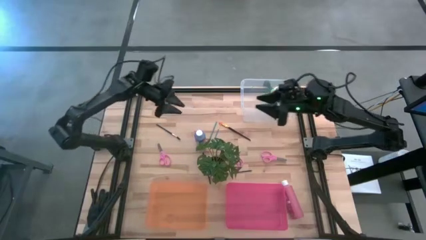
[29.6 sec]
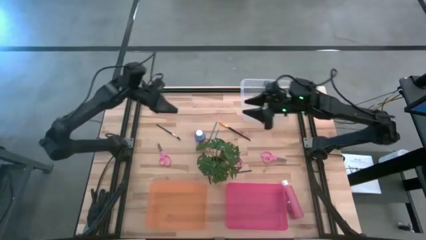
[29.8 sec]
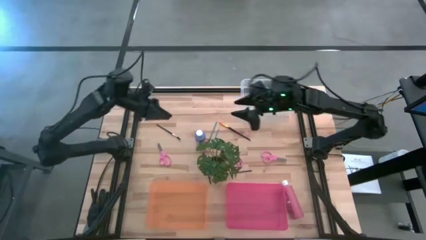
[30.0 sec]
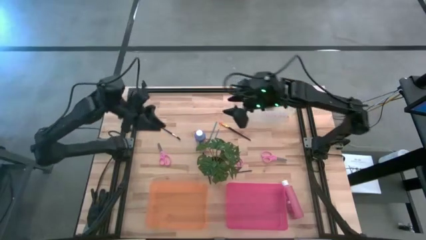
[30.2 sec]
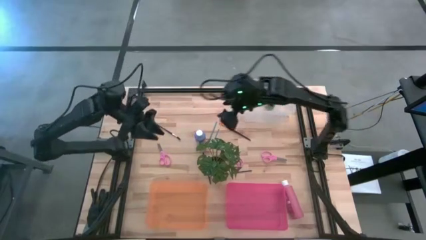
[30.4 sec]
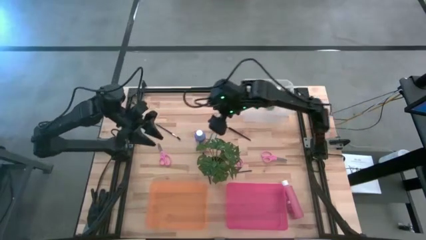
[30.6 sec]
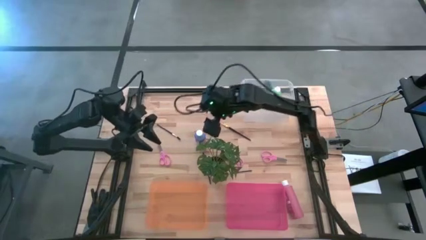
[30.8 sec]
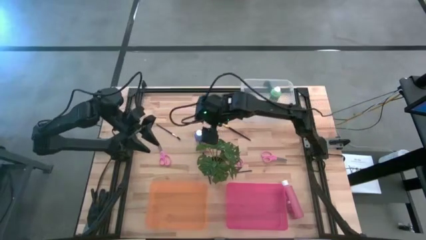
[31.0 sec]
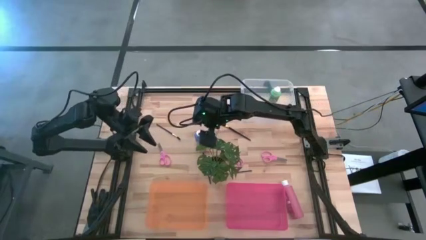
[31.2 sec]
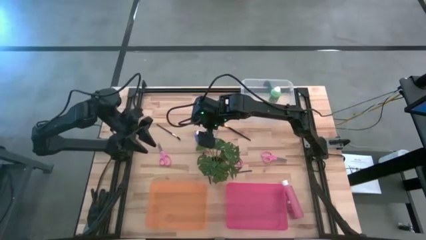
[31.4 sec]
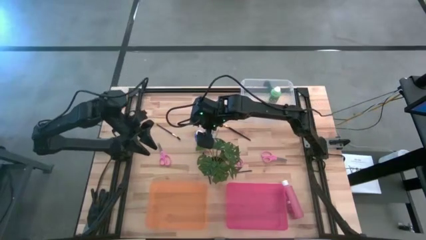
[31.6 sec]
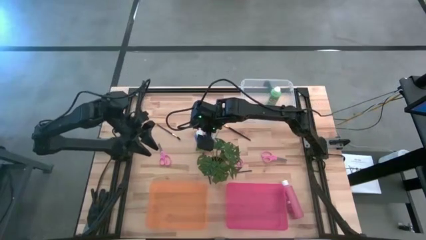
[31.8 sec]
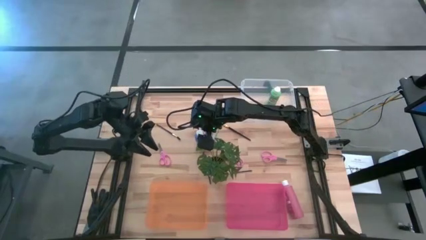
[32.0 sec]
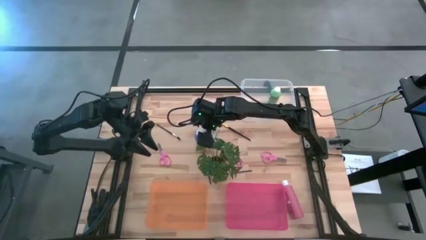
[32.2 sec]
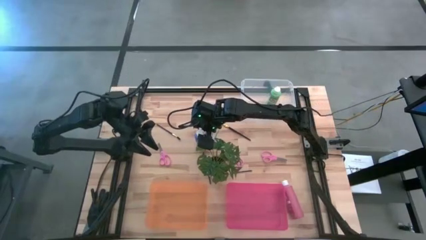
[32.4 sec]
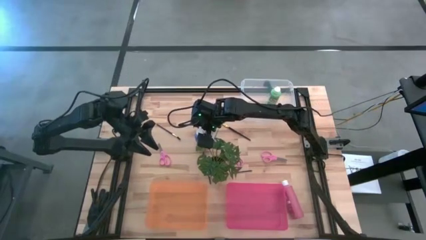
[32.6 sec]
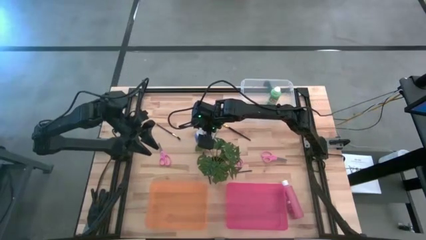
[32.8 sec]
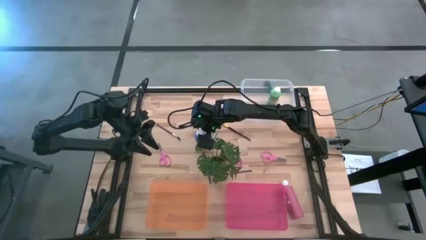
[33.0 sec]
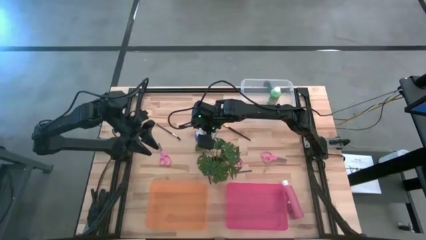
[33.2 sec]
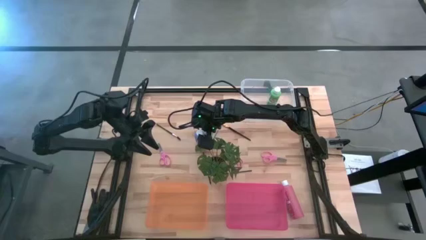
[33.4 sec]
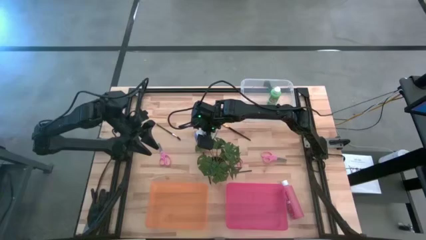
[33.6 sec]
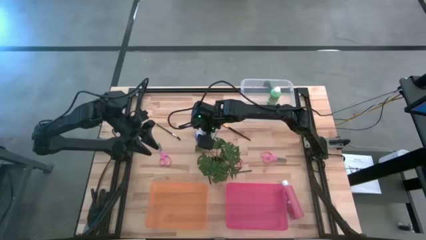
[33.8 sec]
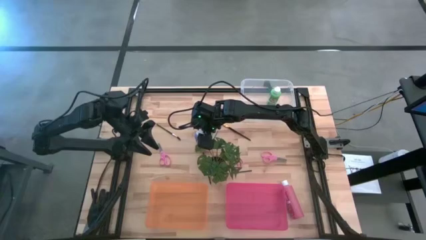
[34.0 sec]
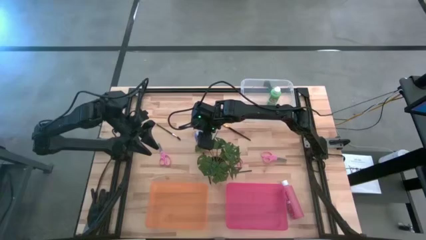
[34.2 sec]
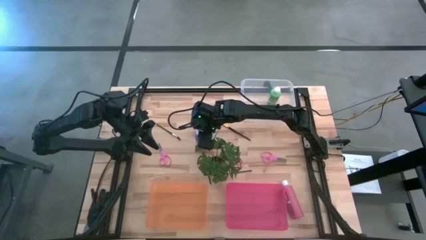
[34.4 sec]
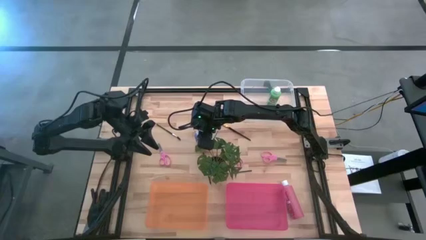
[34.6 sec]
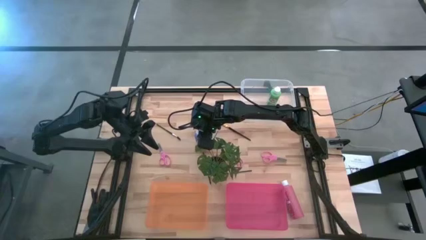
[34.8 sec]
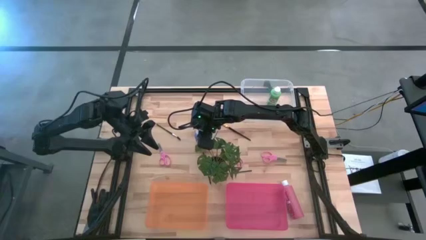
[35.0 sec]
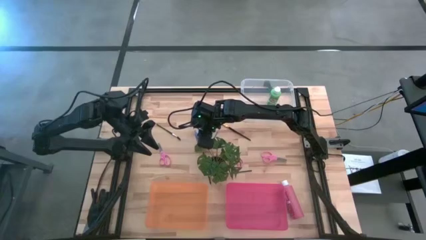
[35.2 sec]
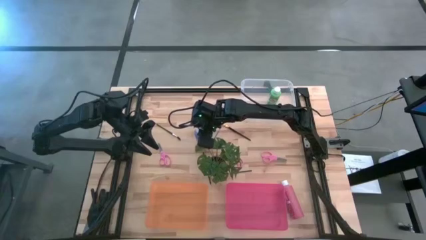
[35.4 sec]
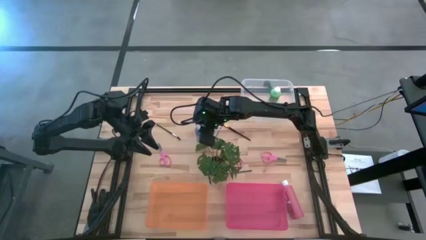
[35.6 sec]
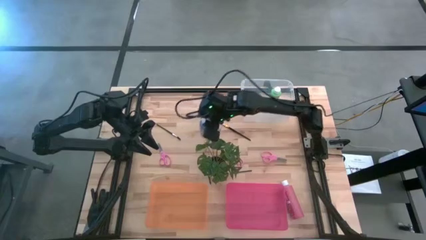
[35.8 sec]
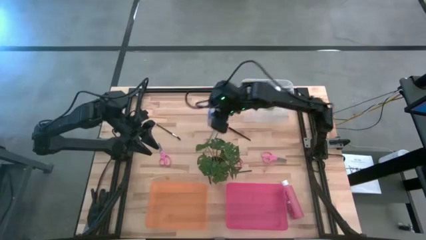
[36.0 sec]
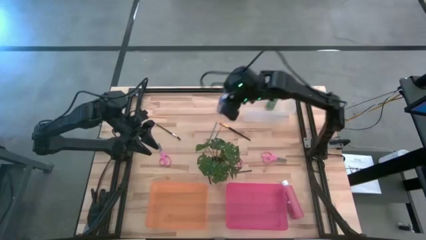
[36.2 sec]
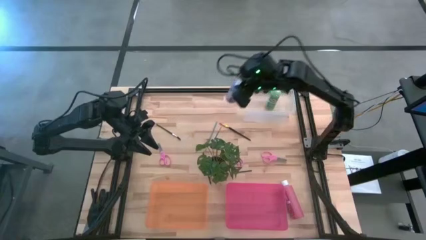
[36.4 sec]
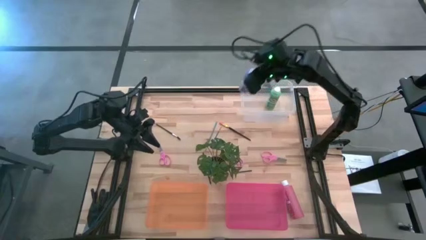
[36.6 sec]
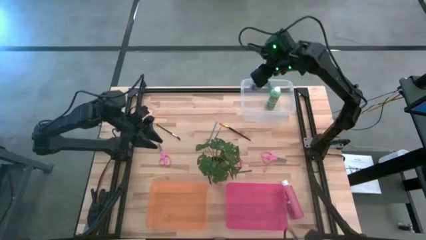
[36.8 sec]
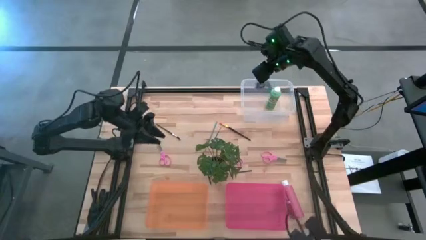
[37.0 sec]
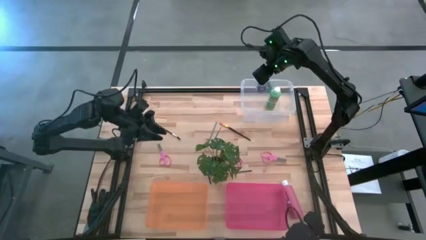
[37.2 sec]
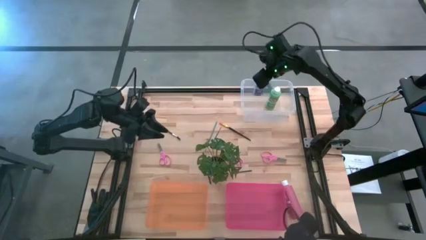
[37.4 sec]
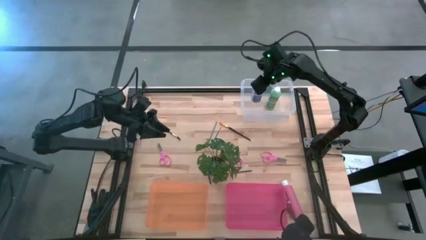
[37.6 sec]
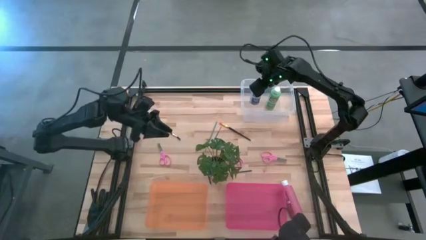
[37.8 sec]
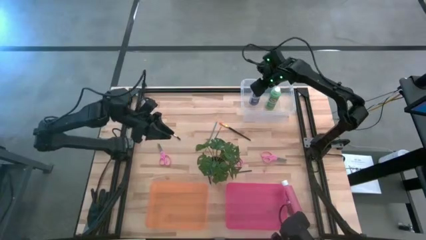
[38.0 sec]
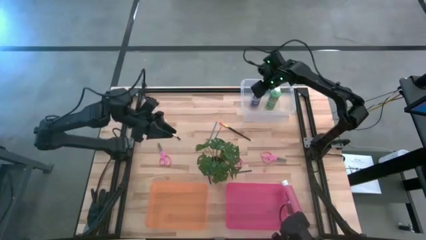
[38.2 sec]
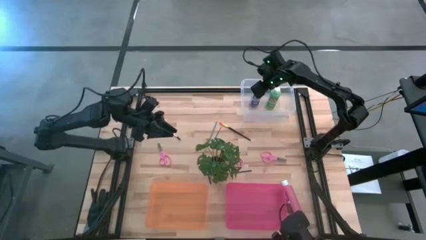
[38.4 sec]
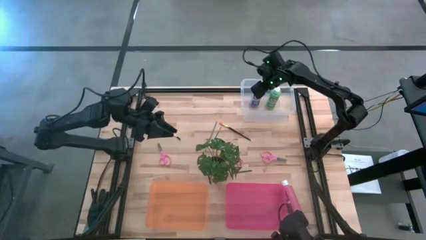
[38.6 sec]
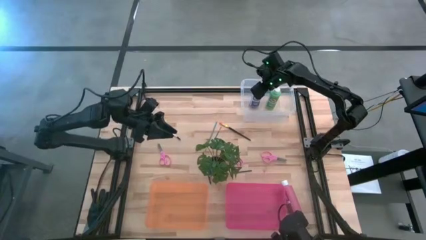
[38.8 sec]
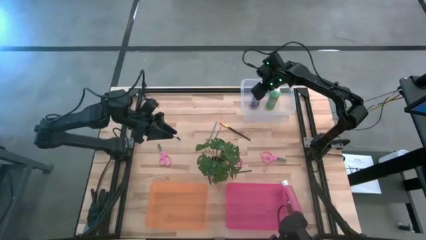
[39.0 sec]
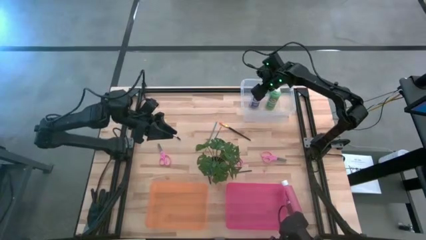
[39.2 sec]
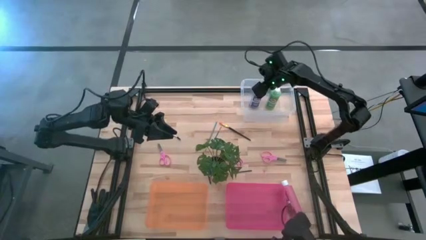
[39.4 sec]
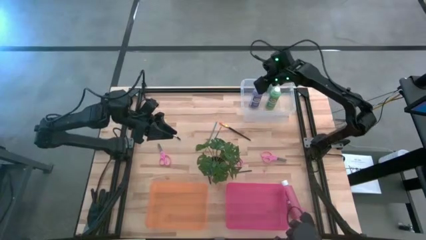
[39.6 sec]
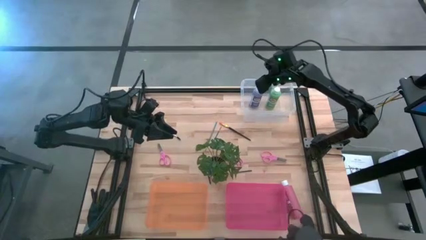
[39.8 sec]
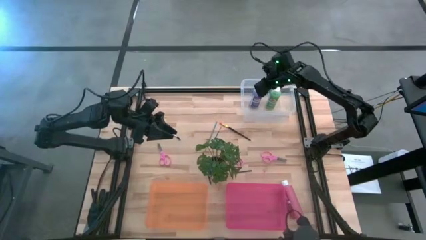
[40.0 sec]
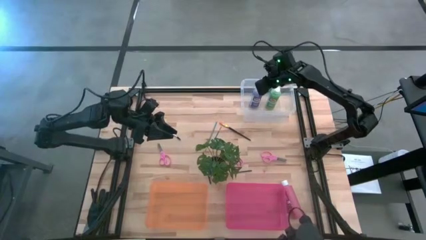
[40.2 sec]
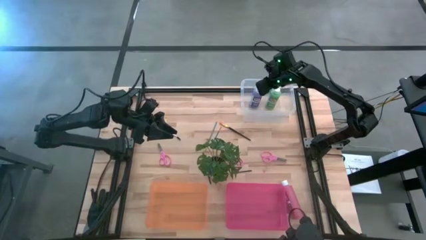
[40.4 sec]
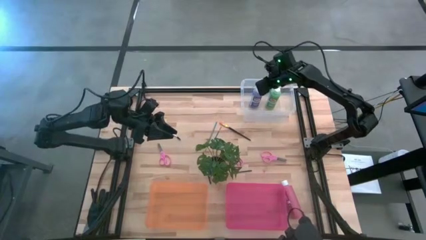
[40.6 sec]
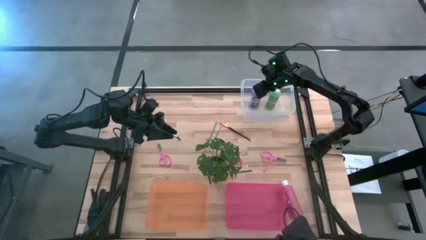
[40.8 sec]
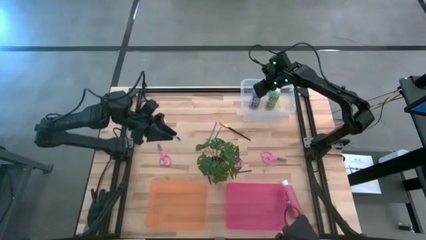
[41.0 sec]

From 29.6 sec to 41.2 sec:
Task: Pick & Place Paint Supplies
Put the purple acrylic craft paint bottle into the transparent bin

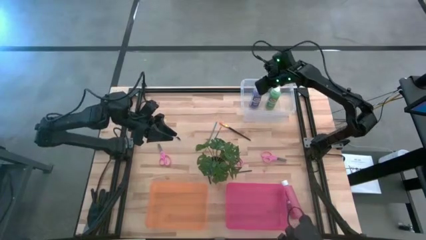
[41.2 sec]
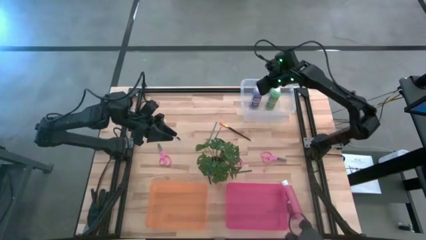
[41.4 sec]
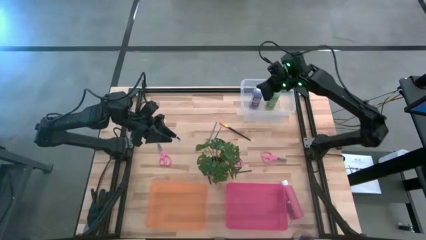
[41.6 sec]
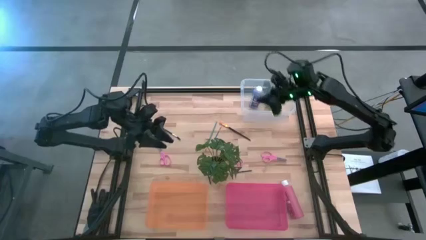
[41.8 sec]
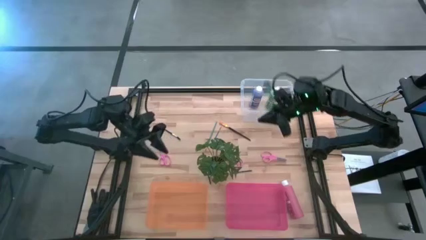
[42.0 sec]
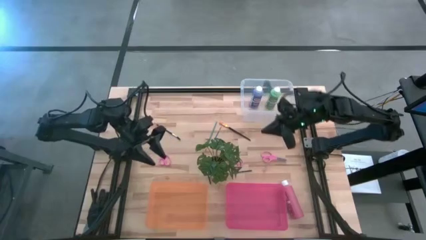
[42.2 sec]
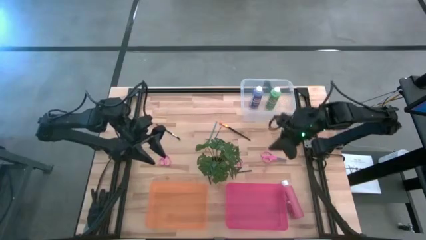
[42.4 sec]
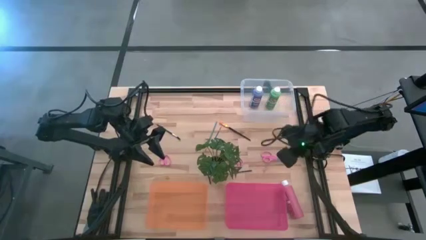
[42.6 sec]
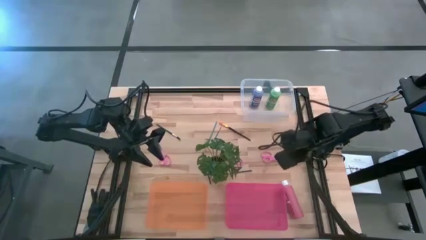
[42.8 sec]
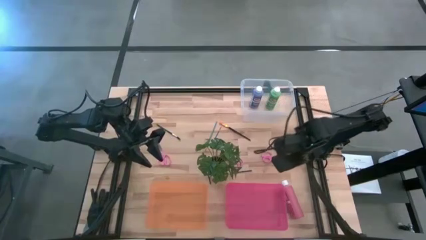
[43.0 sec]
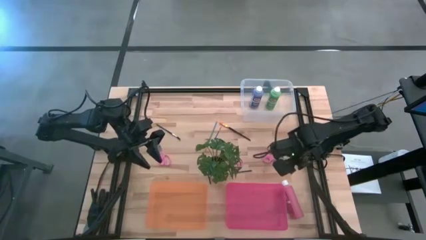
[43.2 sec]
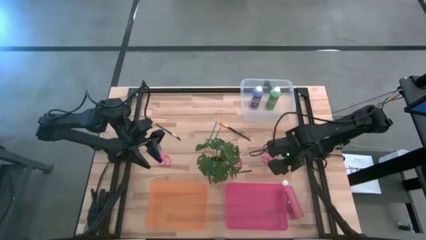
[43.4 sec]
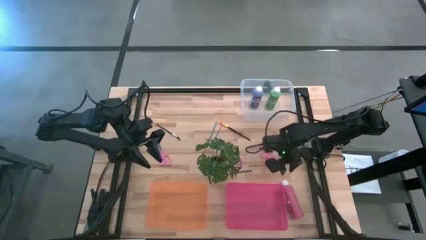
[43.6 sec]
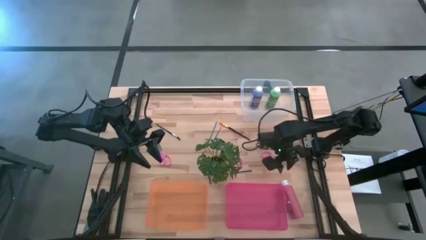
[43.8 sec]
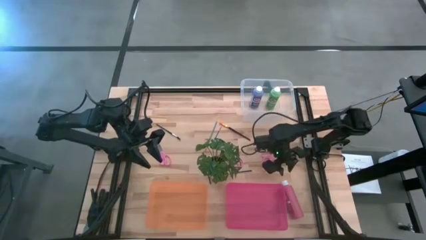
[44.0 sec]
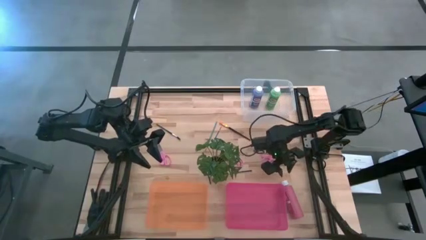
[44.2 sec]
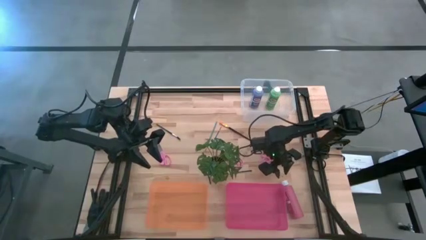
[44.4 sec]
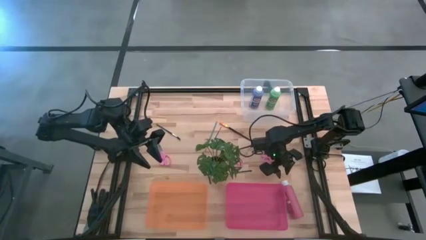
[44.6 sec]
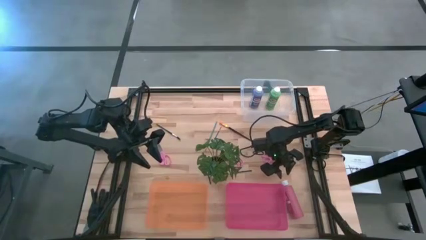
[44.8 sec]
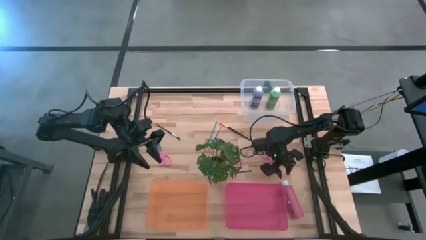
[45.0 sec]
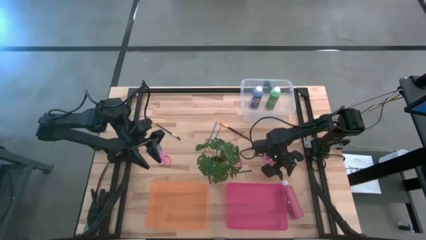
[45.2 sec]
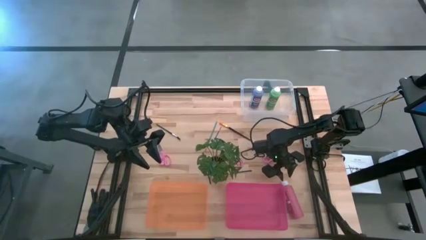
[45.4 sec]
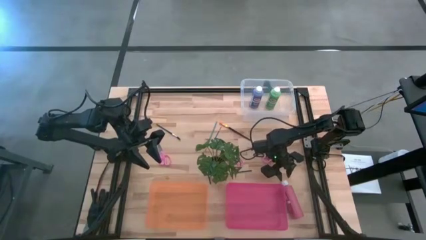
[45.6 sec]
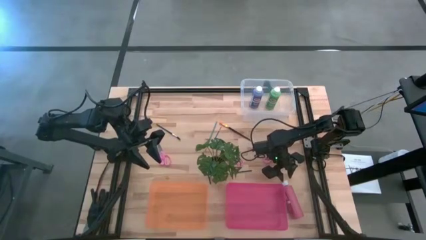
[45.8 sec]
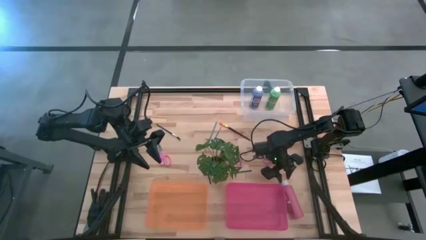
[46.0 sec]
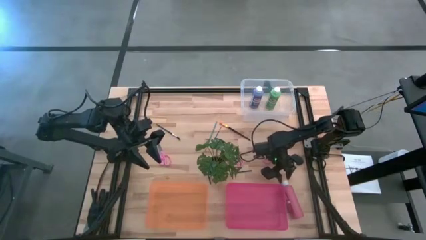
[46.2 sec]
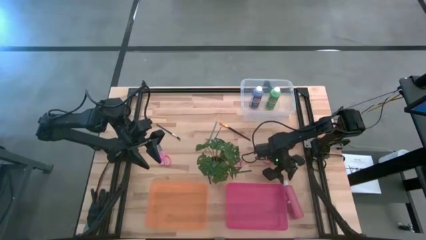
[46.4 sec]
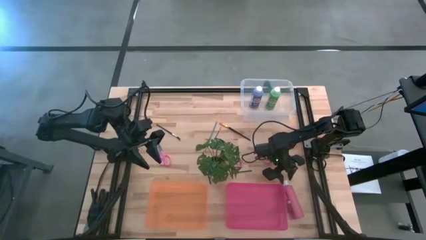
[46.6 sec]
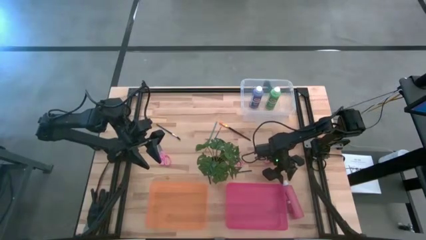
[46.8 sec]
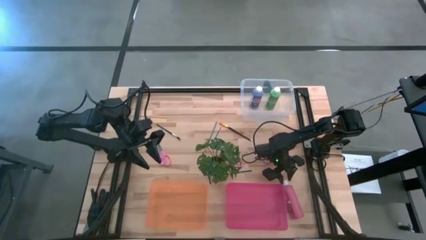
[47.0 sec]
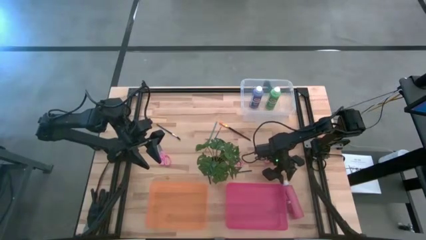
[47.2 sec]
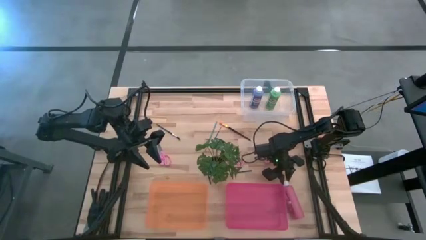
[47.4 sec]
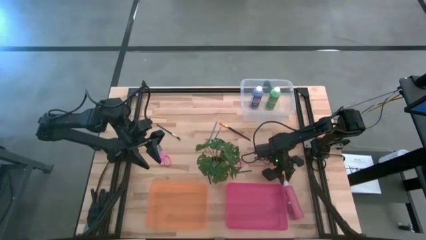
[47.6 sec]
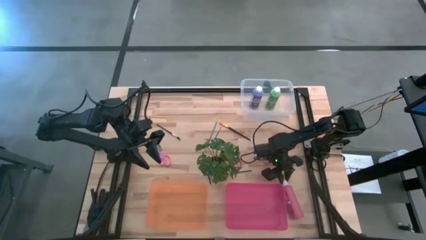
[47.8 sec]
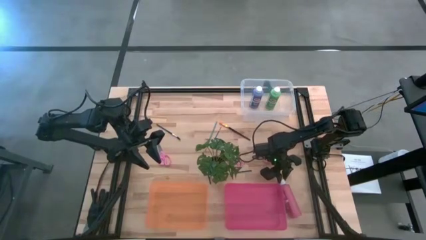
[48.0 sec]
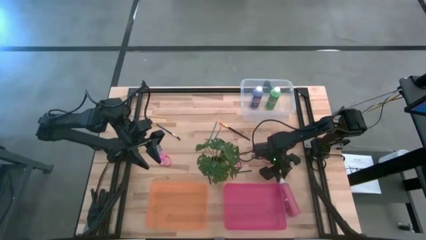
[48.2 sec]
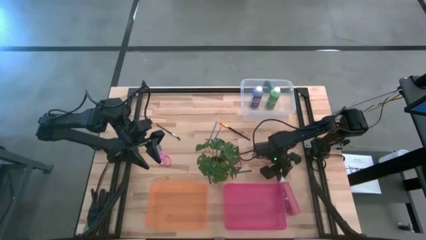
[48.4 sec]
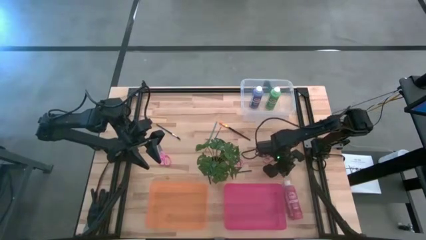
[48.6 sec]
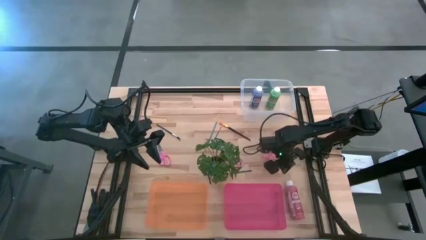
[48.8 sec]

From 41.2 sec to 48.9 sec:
Put the pink acrylic craft paint bottle into the transparent bin
